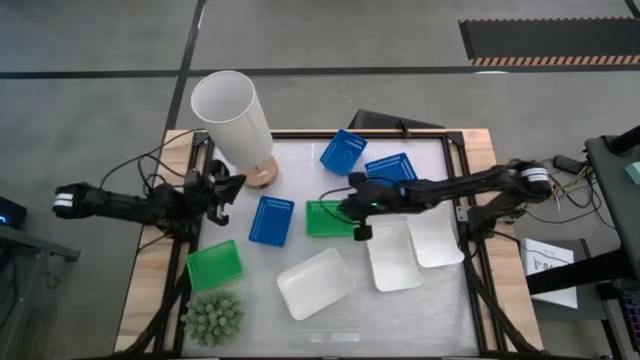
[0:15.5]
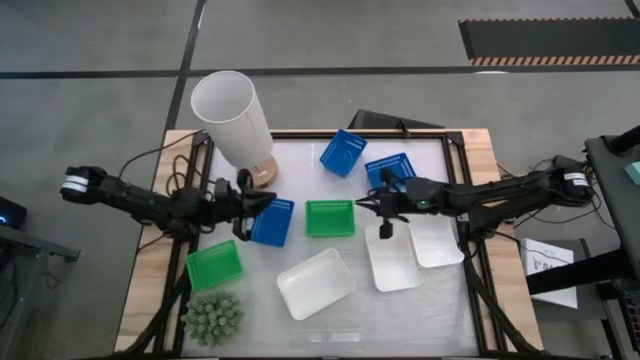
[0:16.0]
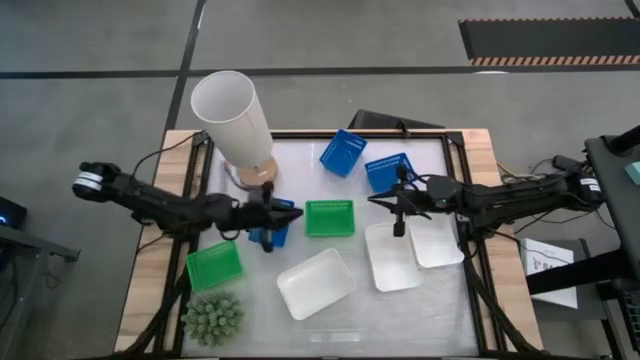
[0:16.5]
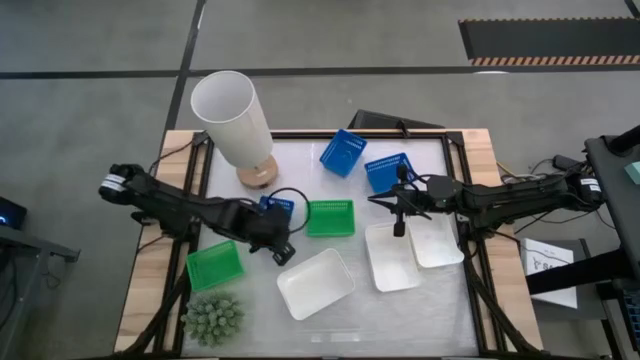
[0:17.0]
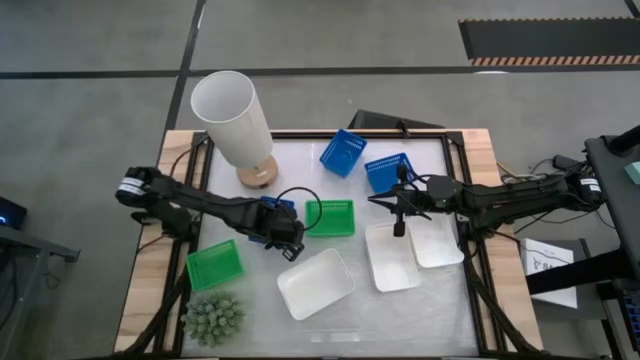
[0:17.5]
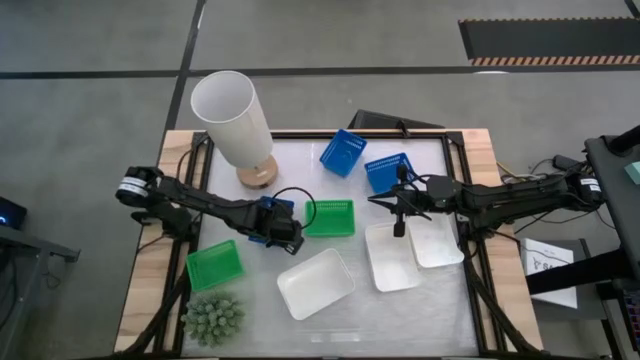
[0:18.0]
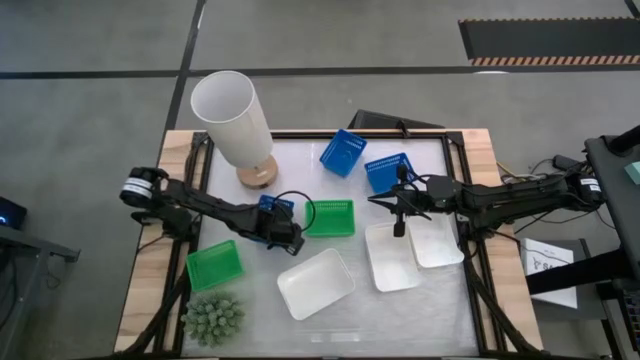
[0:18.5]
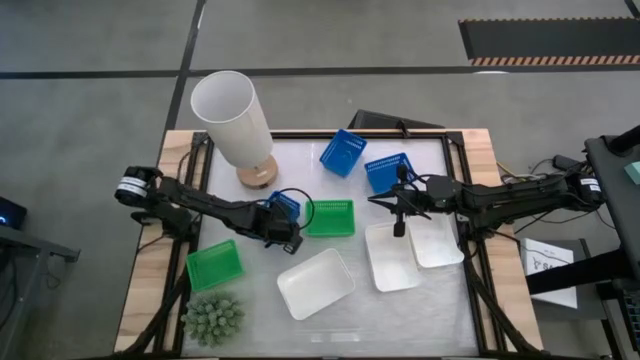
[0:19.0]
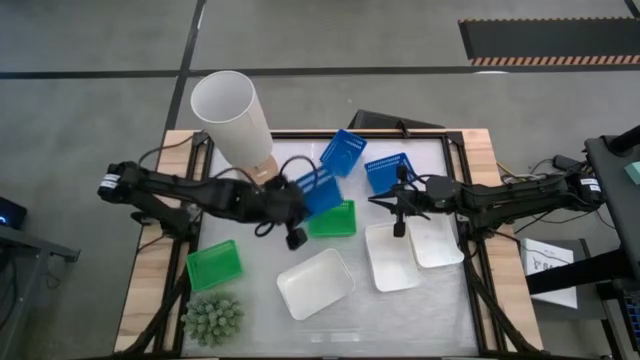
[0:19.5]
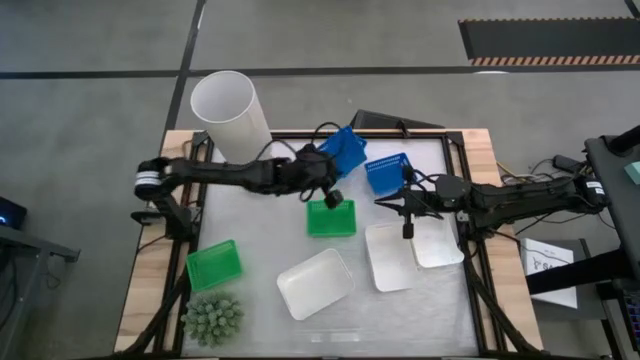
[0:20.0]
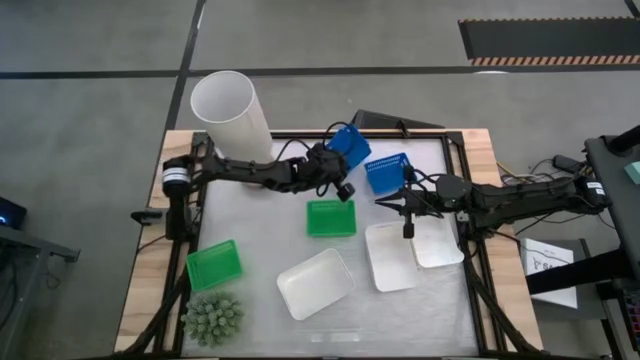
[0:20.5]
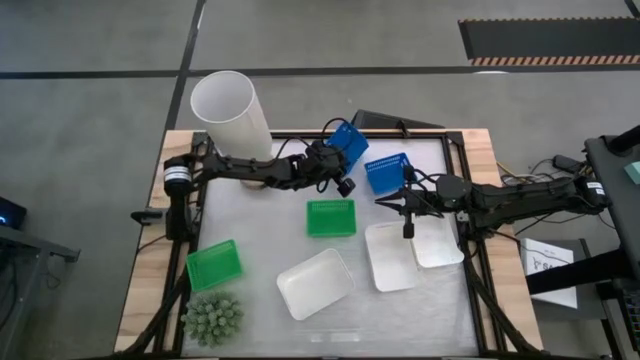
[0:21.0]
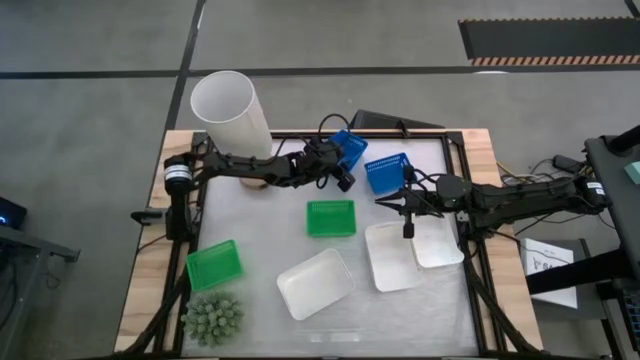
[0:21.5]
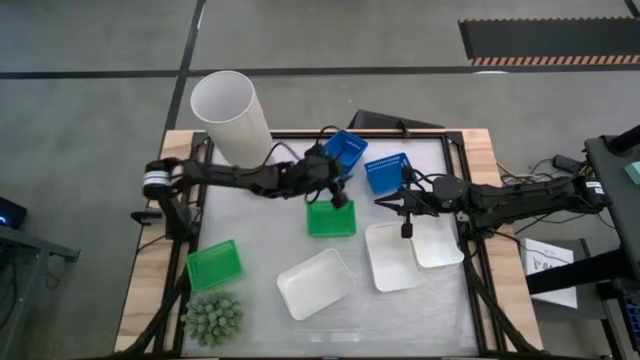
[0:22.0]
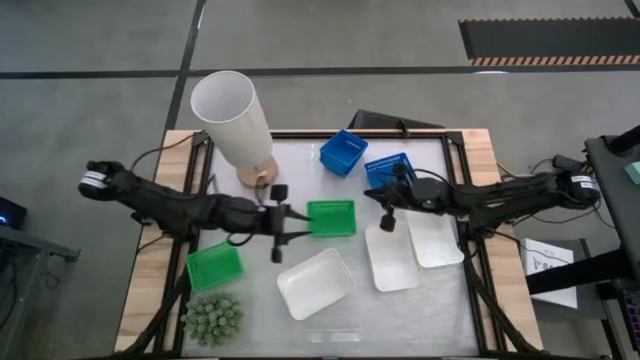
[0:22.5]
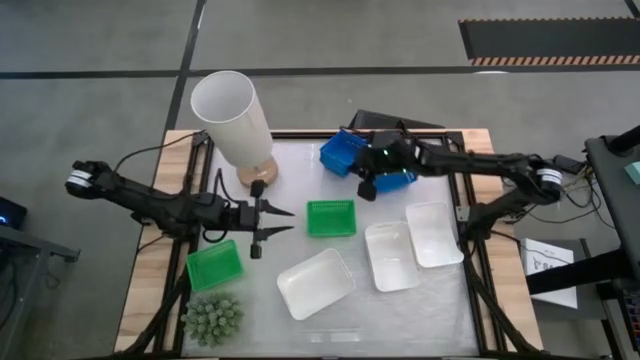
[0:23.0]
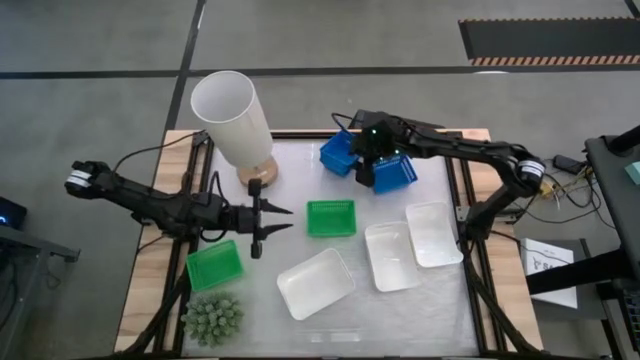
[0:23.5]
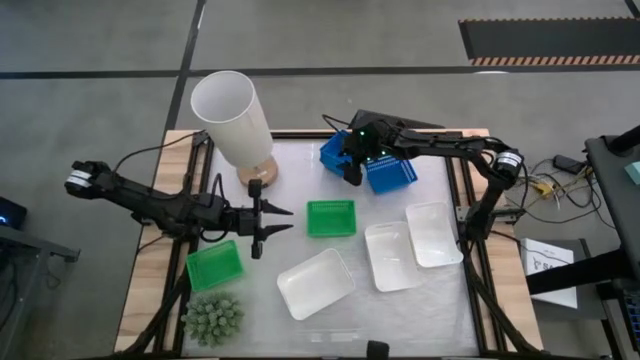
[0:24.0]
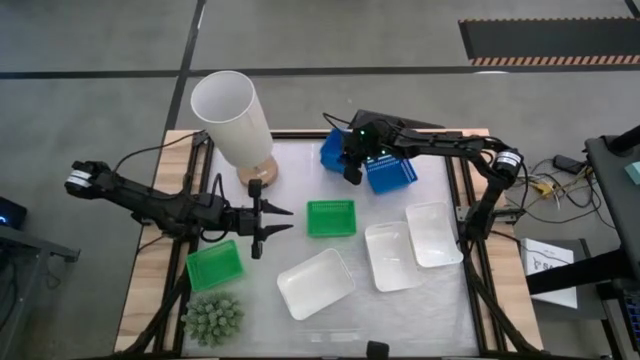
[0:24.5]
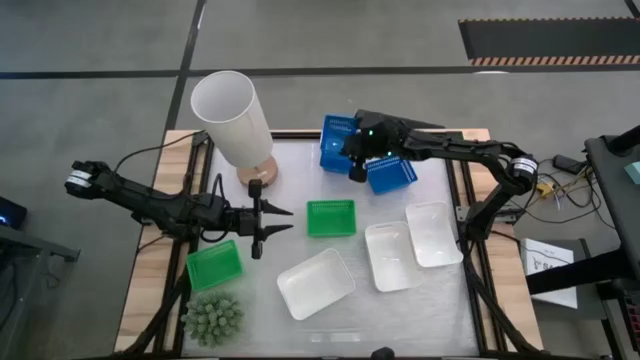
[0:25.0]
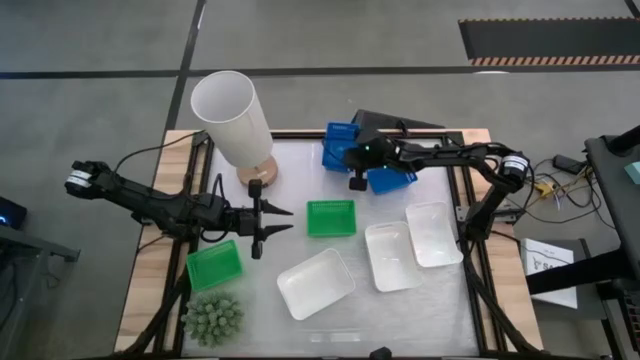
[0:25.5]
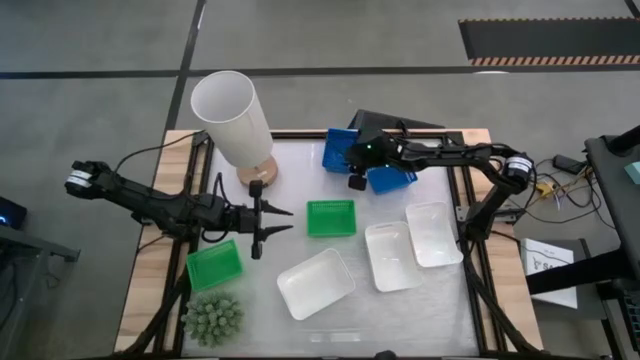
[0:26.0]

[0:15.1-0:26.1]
Stack the bottom blue bin on top of the top left blue bin

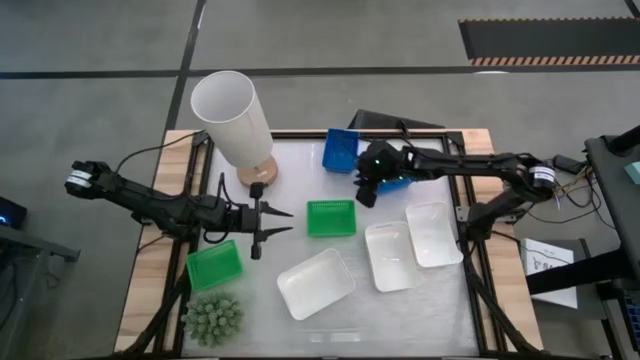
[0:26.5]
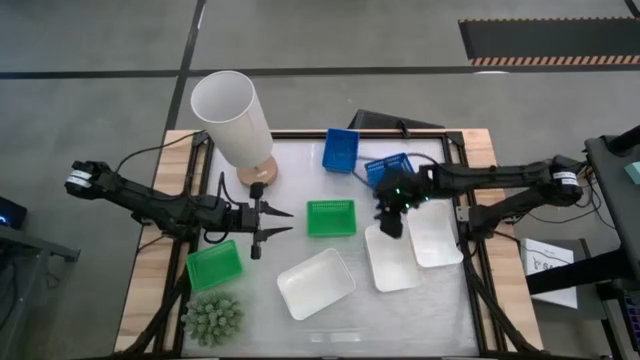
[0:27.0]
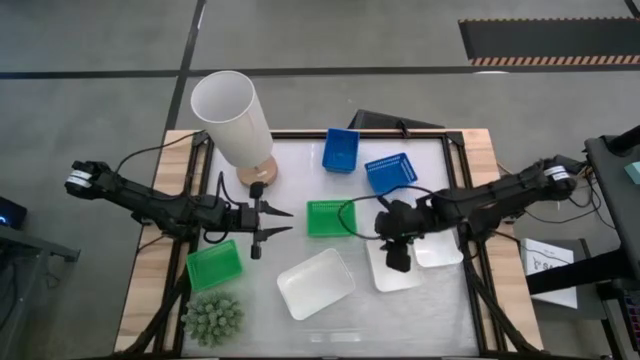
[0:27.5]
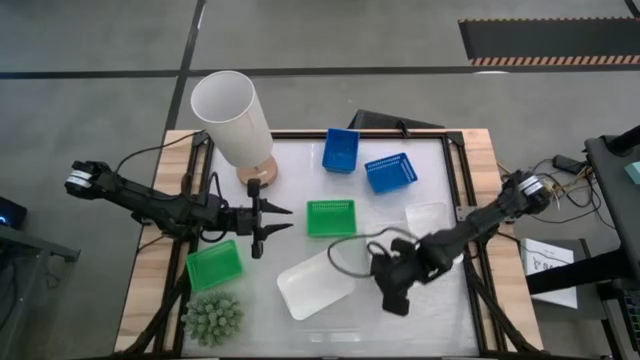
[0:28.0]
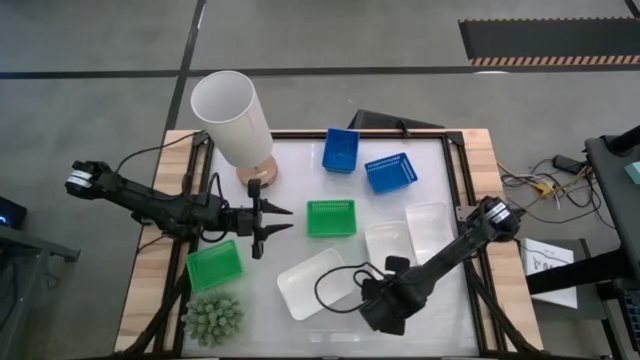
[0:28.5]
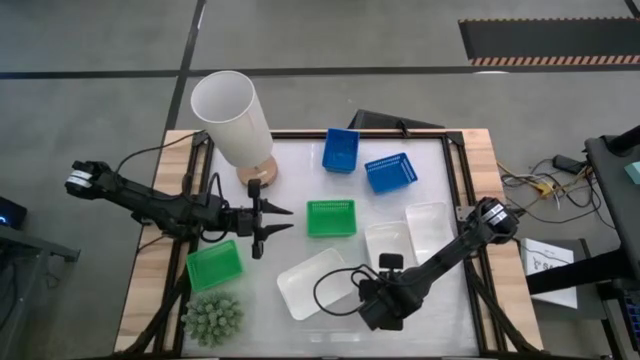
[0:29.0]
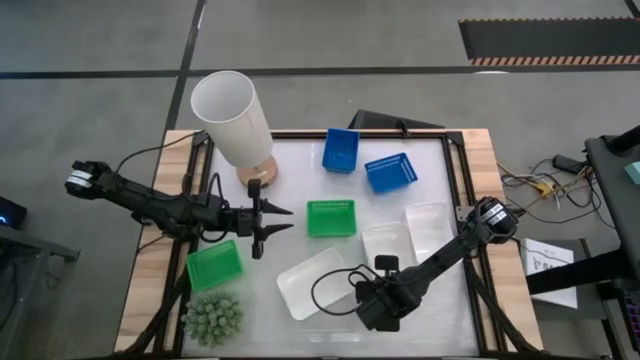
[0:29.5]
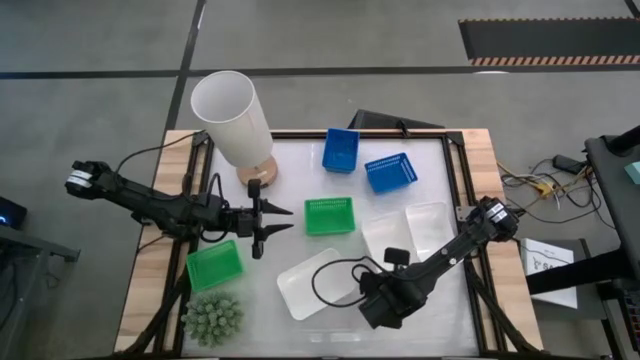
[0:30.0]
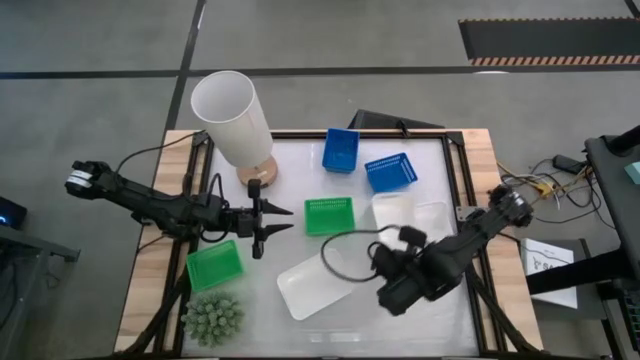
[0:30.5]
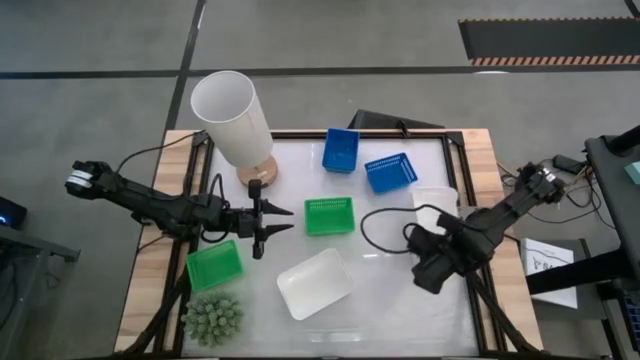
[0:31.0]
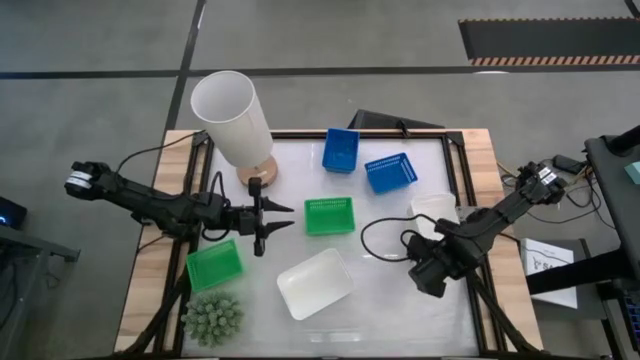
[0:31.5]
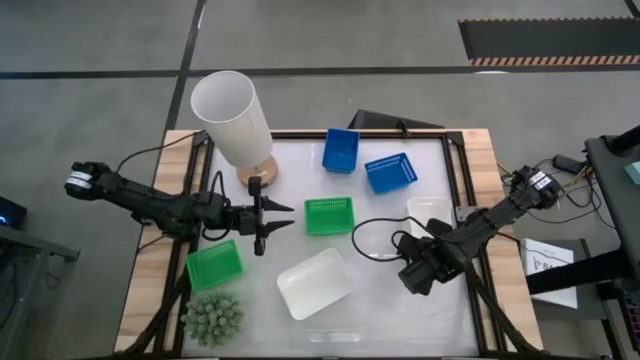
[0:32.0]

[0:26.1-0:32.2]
Stack the middle white bin on top of the right white bin
